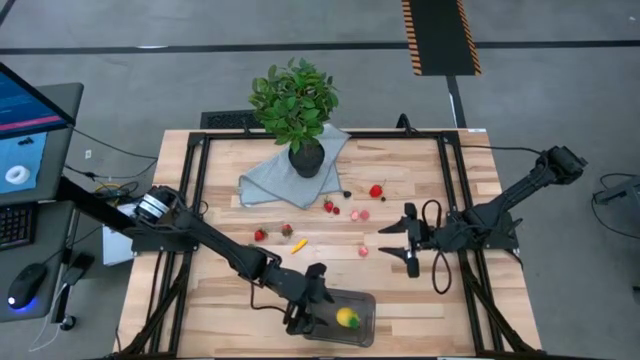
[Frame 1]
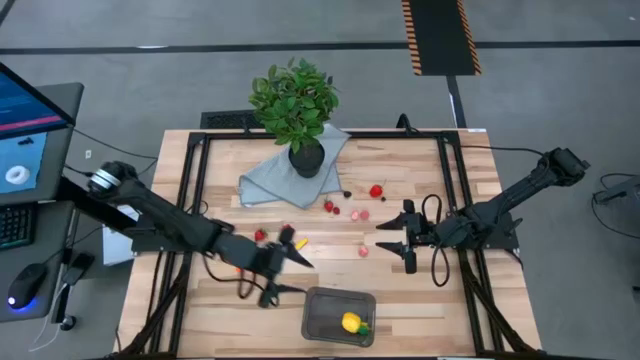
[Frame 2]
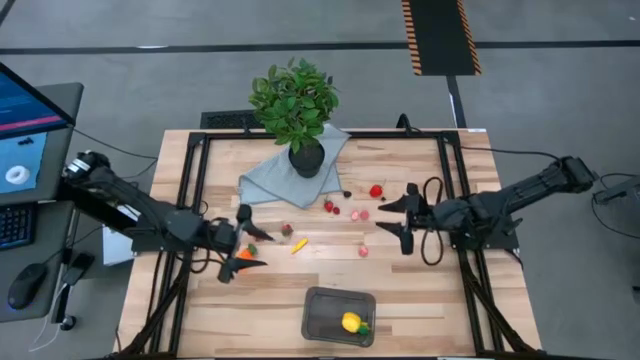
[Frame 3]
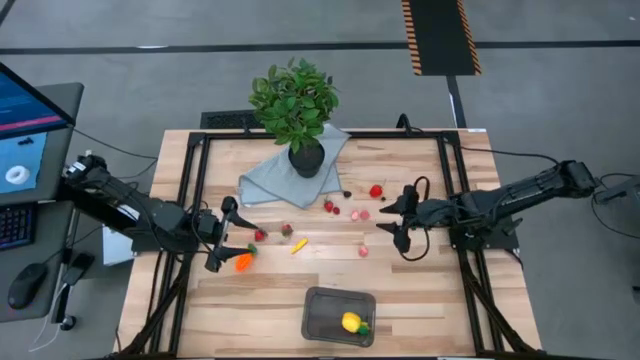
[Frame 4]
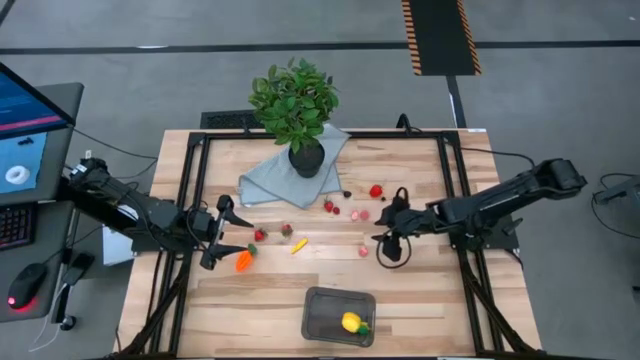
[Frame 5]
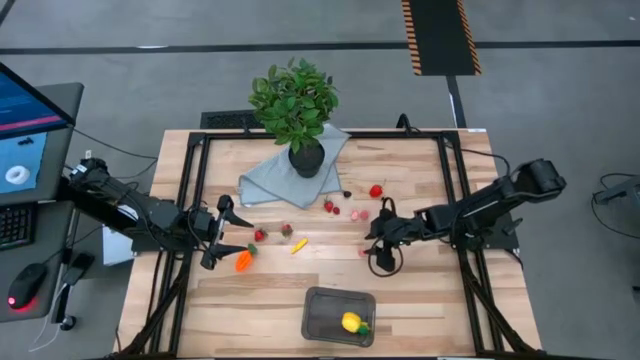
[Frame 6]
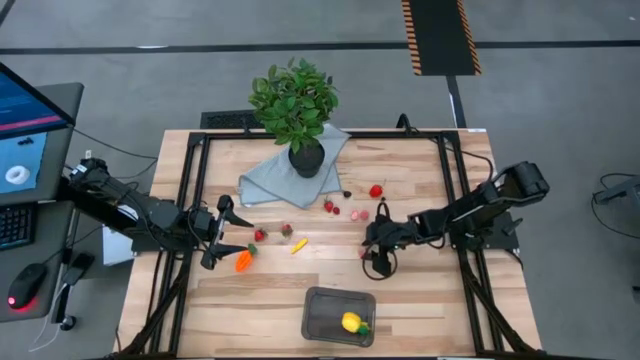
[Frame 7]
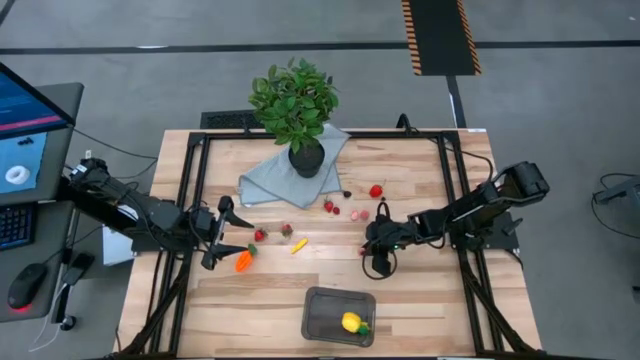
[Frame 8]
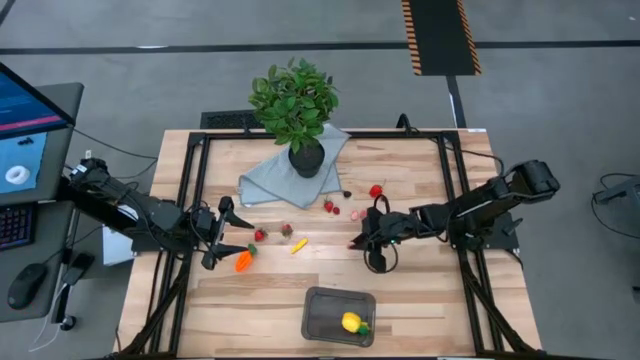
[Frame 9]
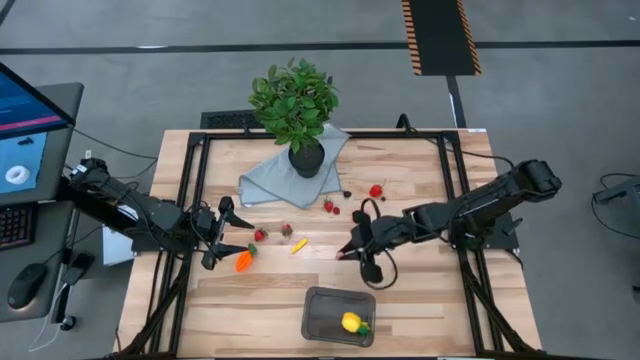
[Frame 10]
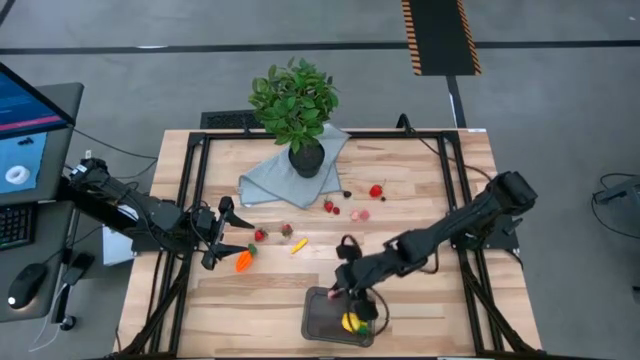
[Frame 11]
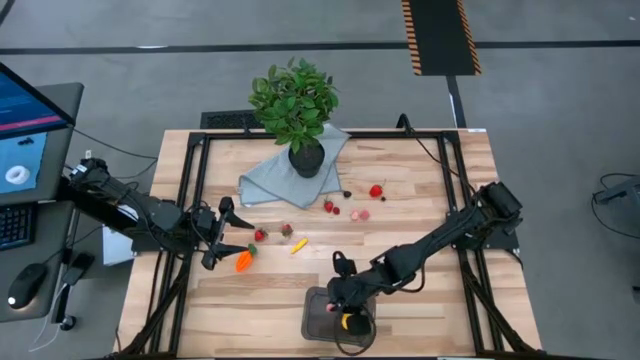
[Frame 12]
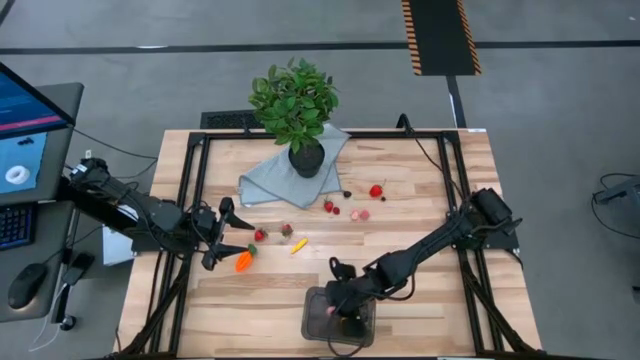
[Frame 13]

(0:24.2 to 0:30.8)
Task: Pick and placing Produce into tupperware
Put the pink peach into the black bin

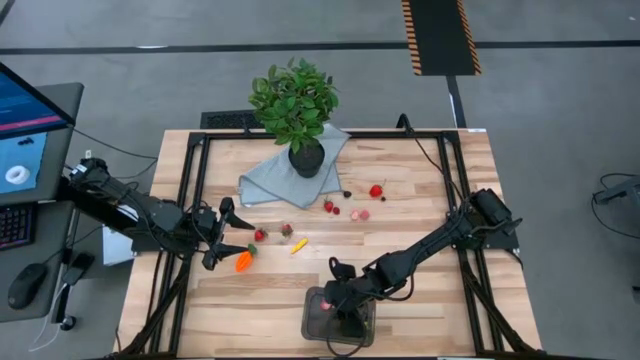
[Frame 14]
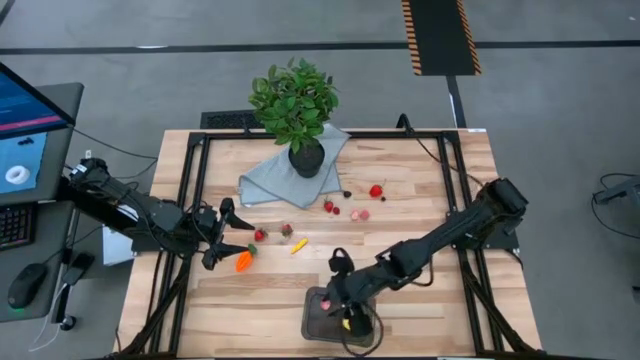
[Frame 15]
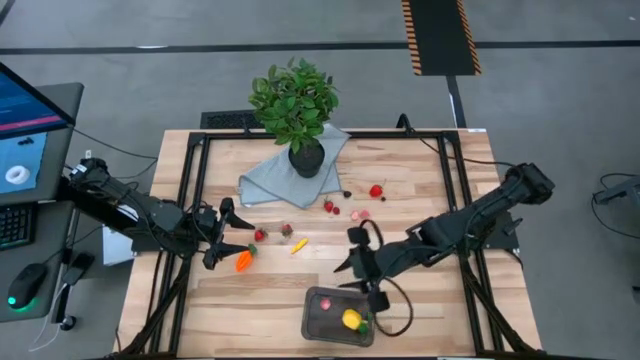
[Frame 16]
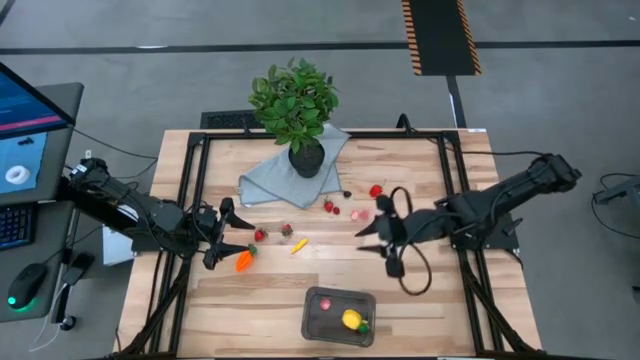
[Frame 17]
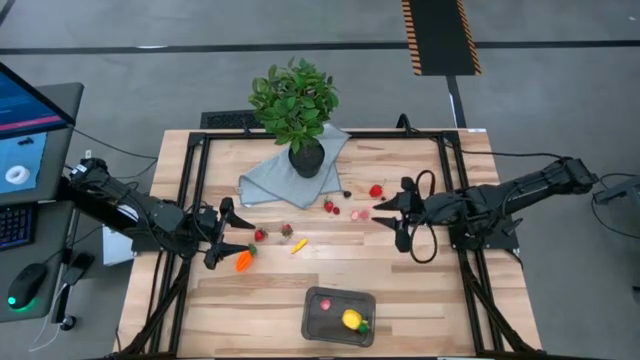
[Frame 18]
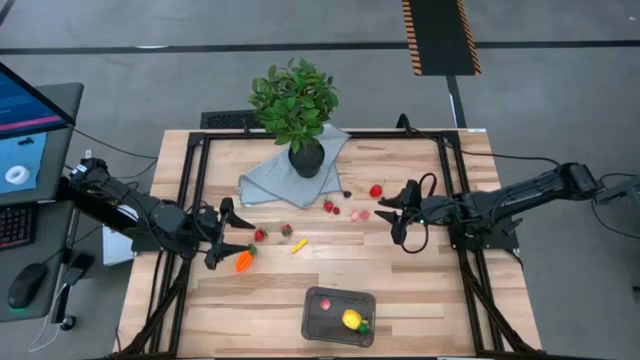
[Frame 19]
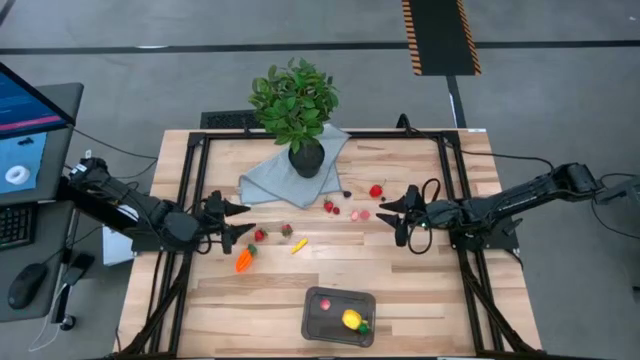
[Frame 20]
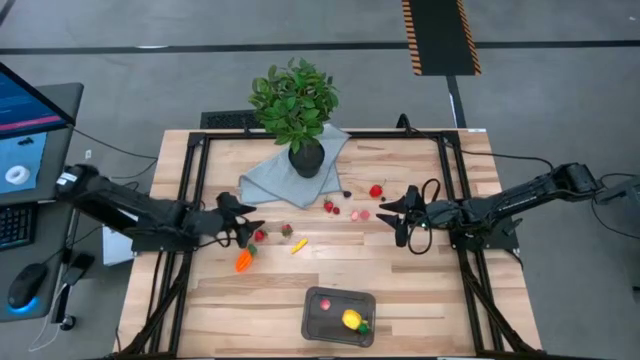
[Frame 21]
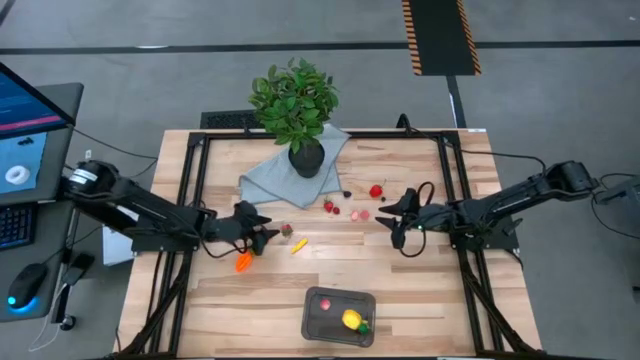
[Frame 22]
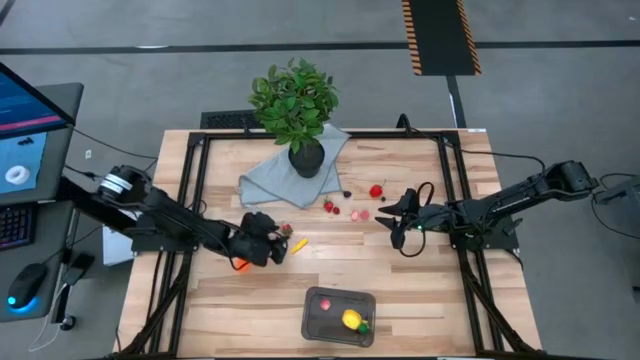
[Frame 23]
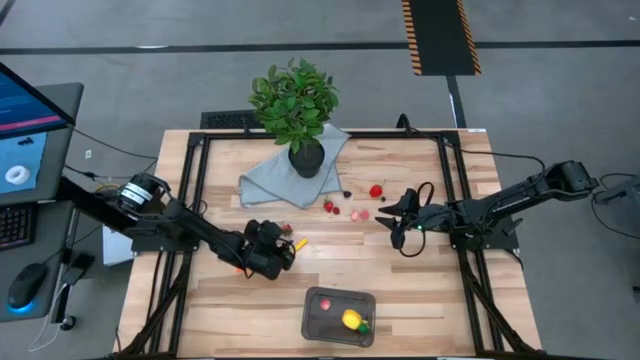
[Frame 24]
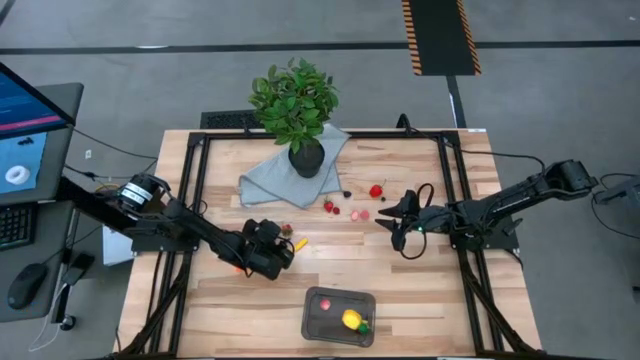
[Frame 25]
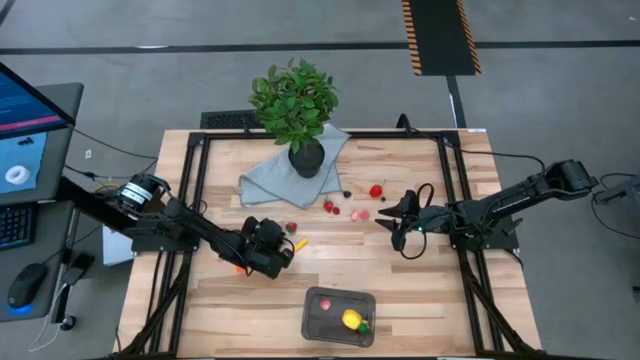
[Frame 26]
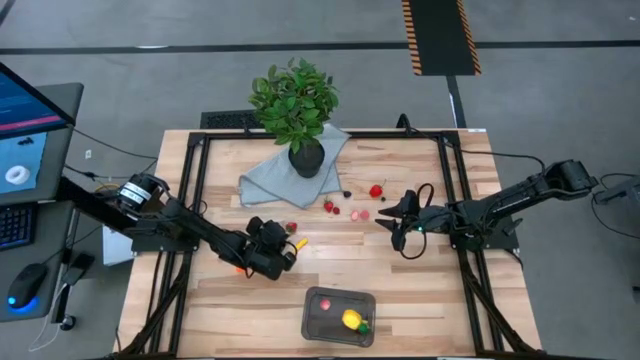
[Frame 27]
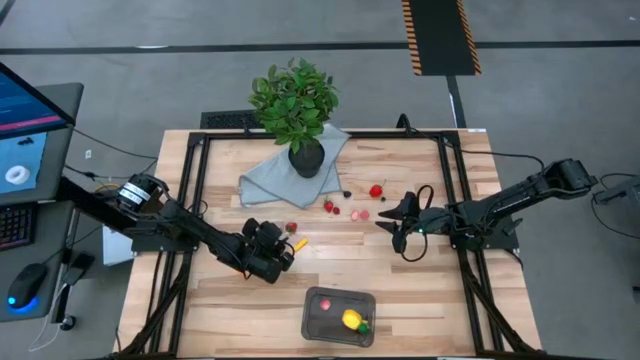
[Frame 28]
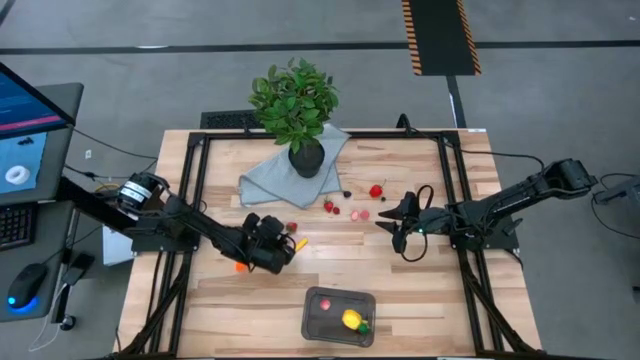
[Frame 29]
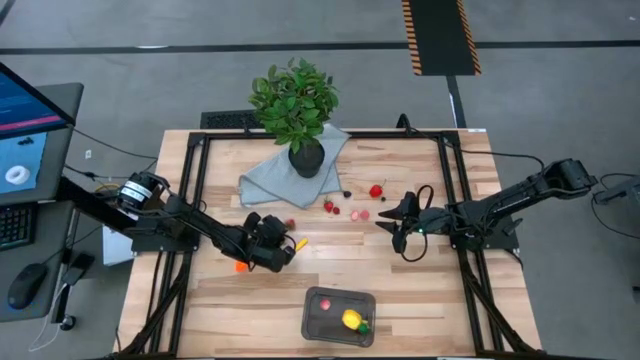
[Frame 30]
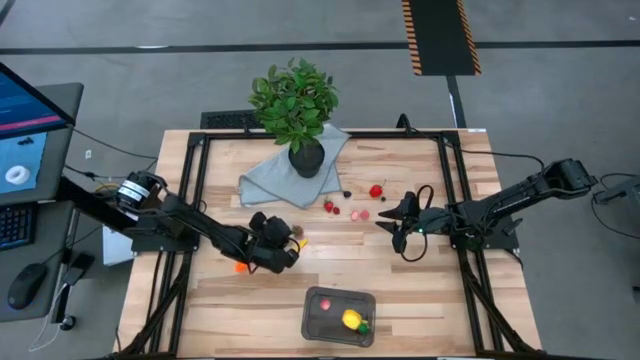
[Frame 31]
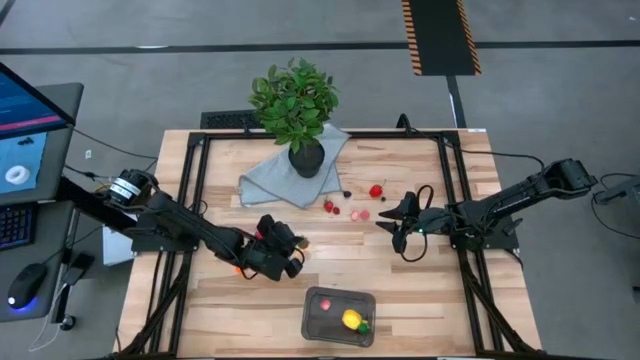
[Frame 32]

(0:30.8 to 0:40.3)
Put the red strawberry into the black bin

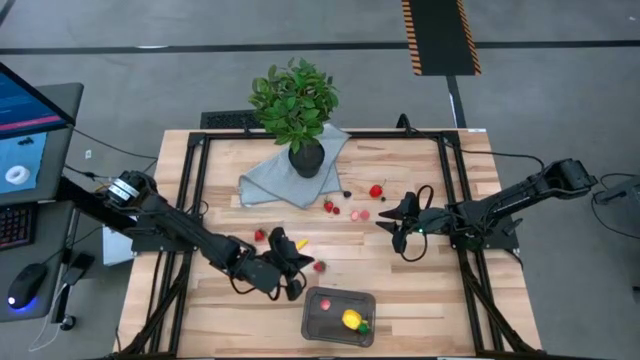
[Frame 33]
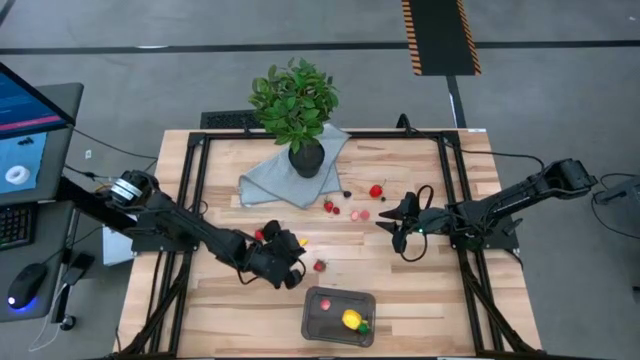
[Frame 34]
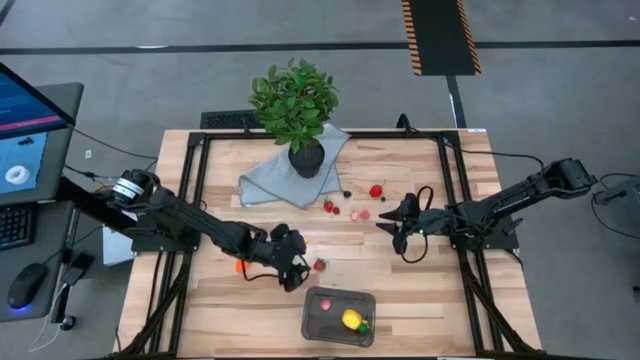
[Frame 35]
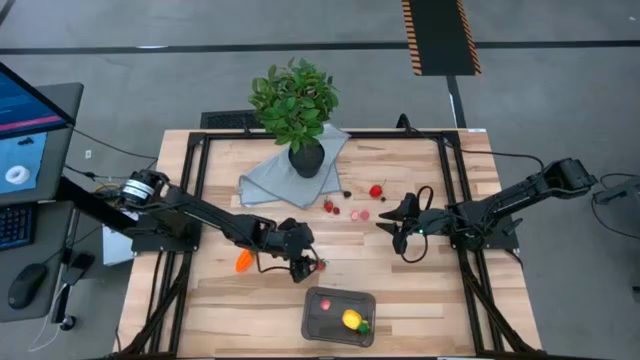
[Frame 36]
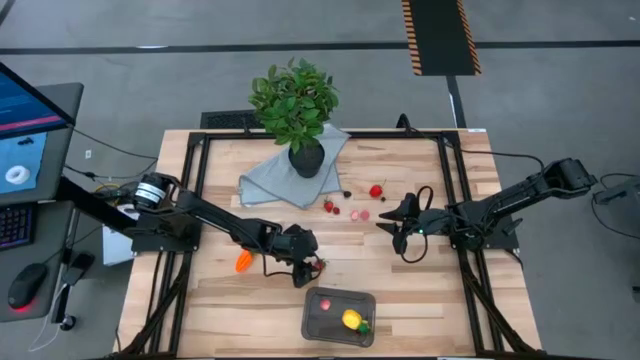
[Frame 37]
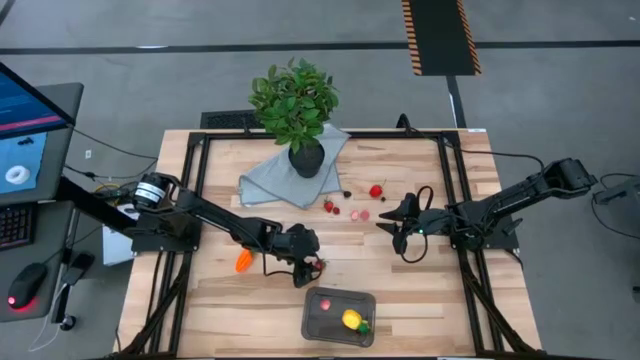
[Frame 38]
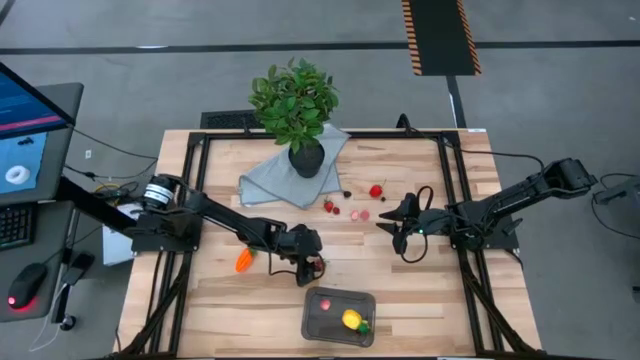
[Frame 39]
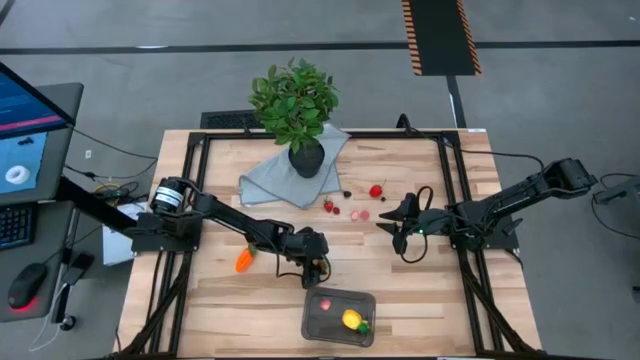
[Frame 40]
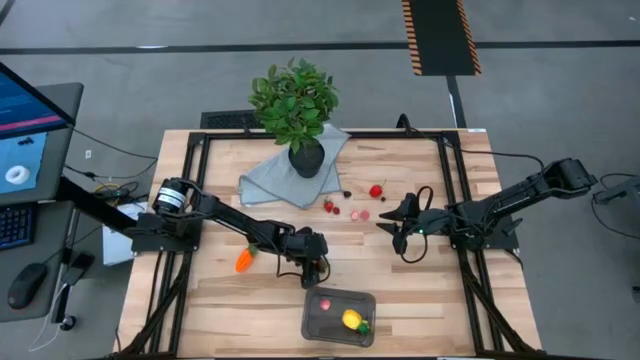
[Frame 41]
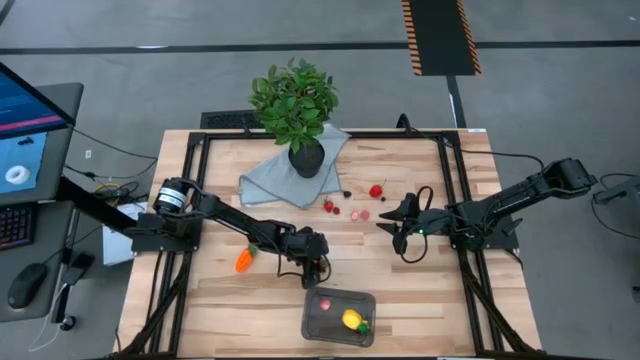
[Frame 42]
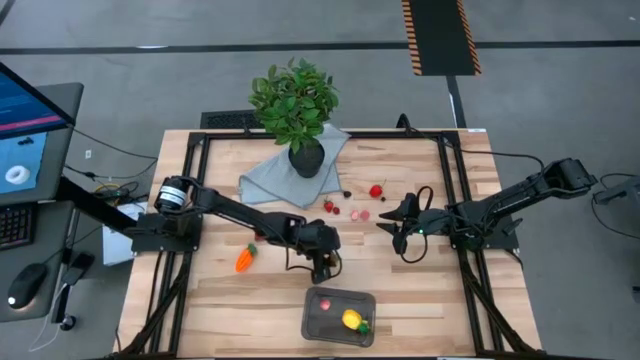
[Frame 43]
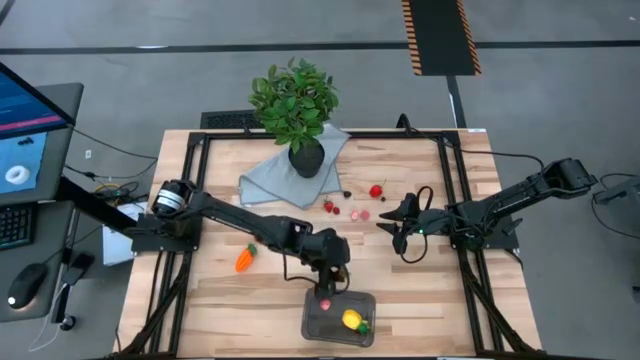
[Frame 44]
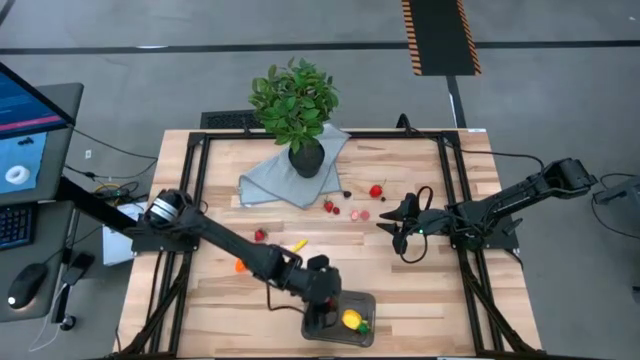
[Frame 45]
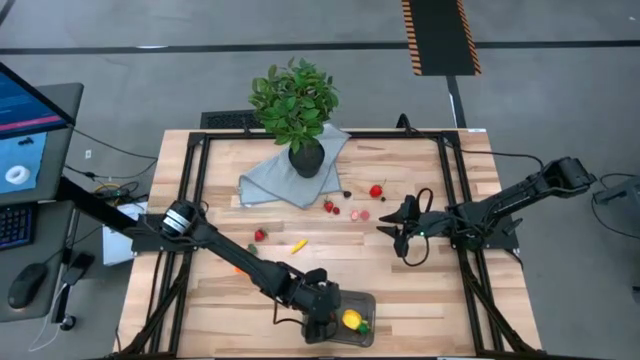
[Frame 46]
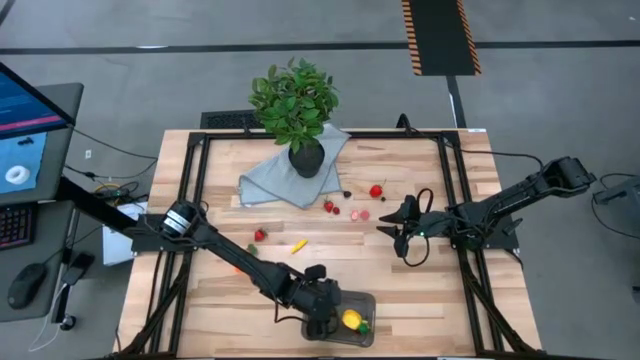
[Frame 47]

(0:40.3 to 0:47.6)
Put the red strawberry into the black bin
